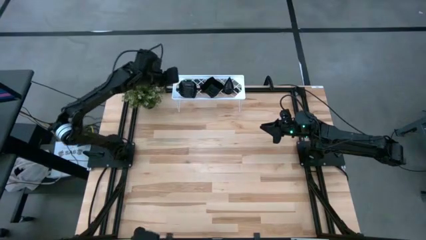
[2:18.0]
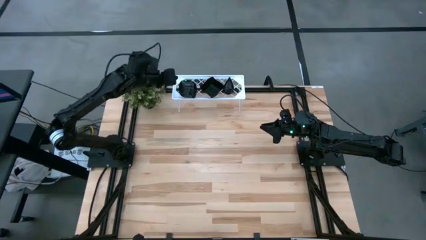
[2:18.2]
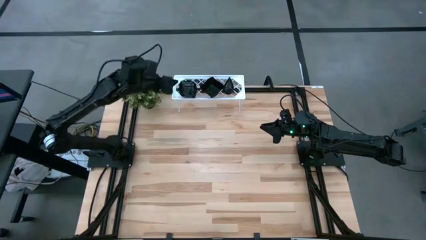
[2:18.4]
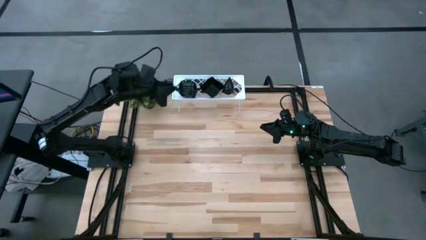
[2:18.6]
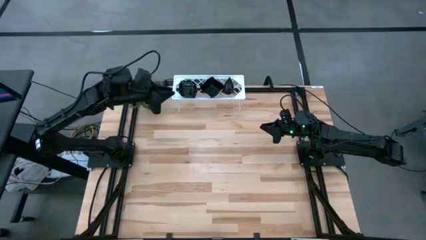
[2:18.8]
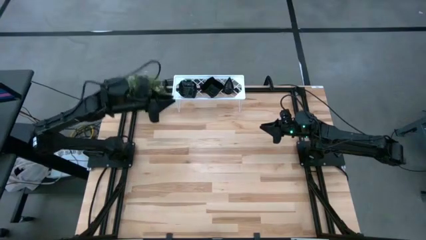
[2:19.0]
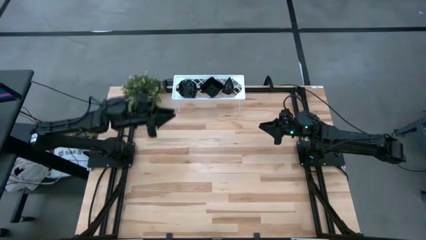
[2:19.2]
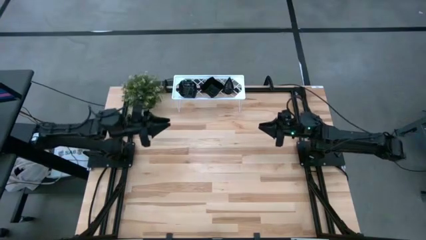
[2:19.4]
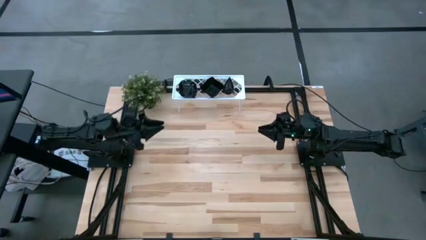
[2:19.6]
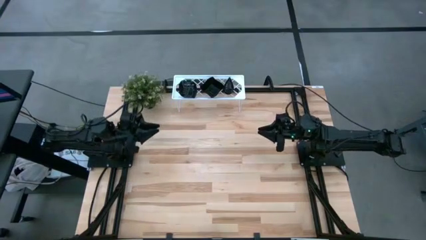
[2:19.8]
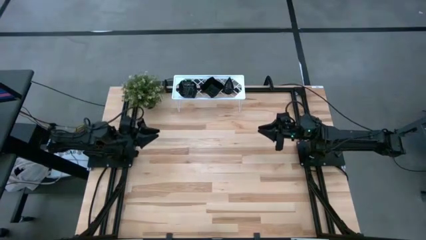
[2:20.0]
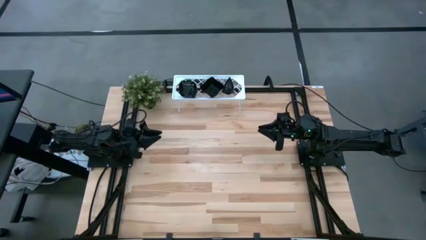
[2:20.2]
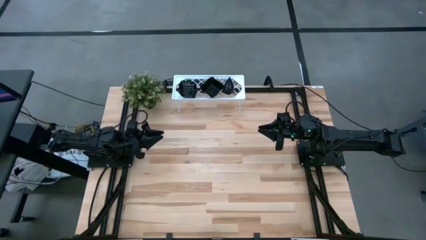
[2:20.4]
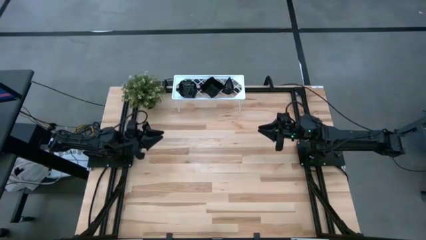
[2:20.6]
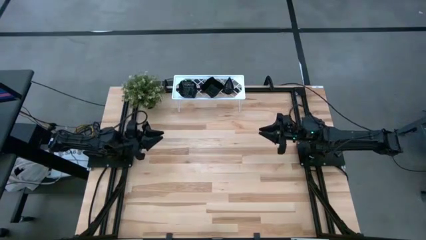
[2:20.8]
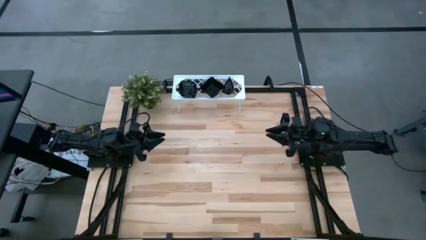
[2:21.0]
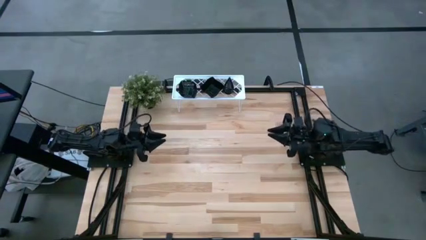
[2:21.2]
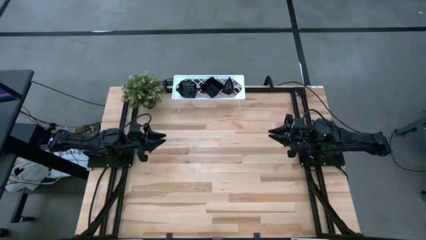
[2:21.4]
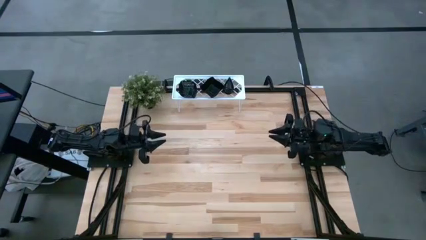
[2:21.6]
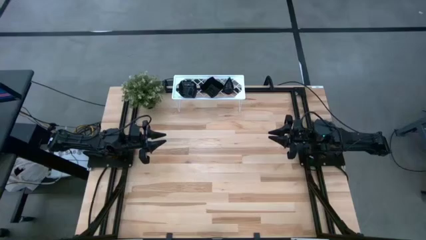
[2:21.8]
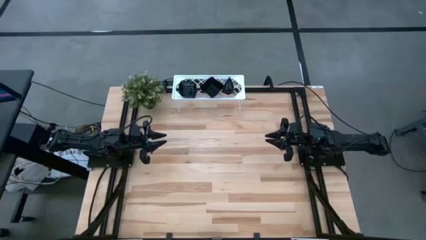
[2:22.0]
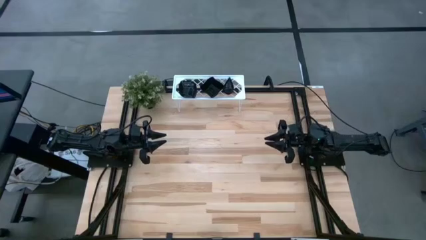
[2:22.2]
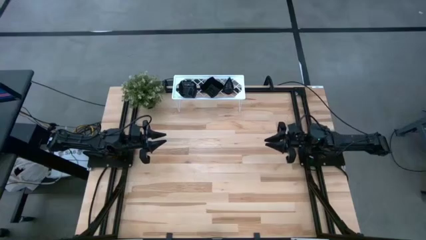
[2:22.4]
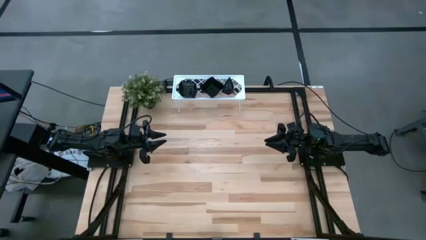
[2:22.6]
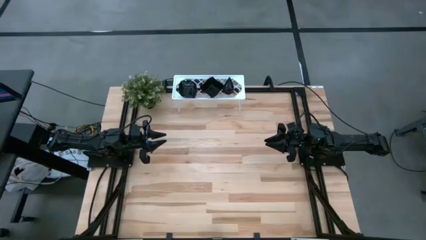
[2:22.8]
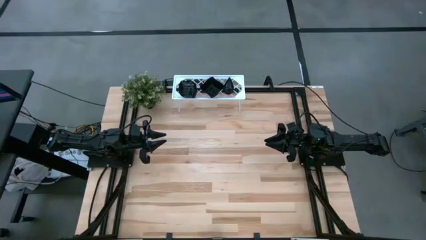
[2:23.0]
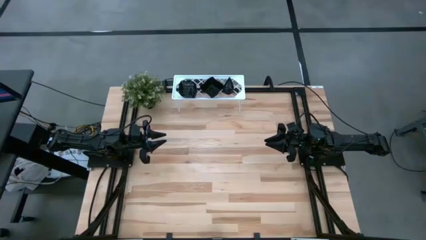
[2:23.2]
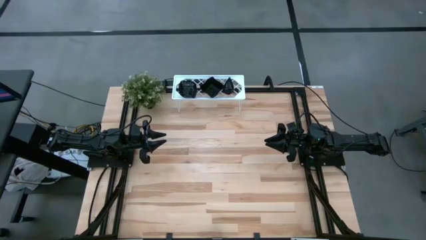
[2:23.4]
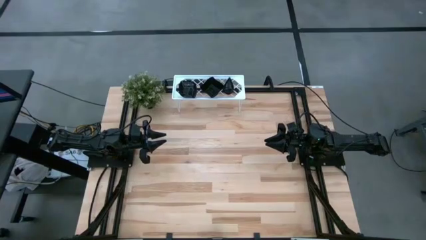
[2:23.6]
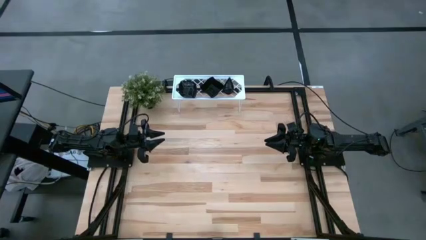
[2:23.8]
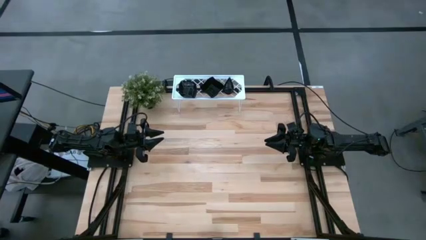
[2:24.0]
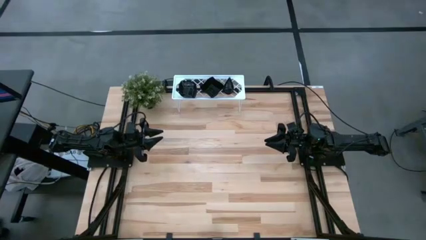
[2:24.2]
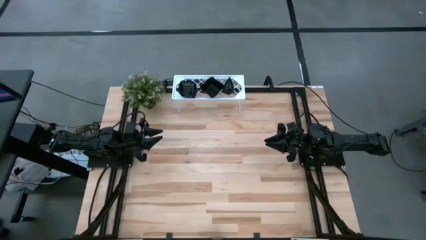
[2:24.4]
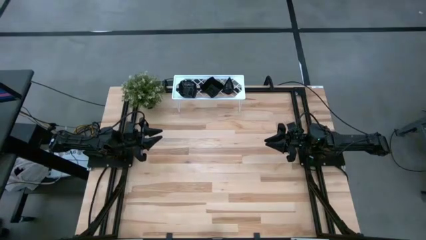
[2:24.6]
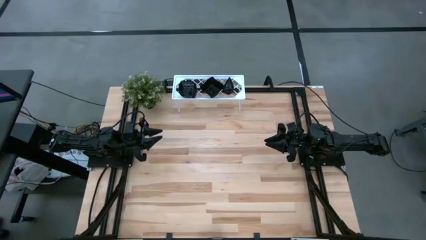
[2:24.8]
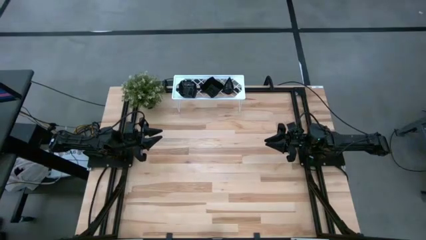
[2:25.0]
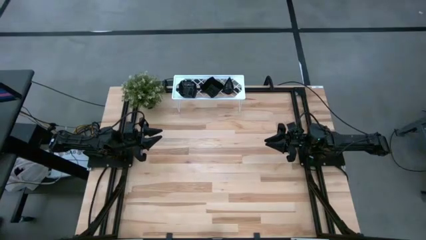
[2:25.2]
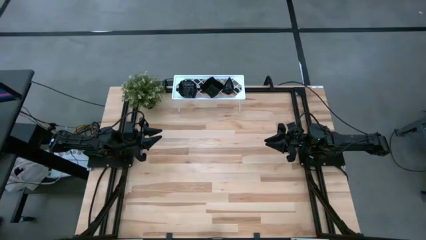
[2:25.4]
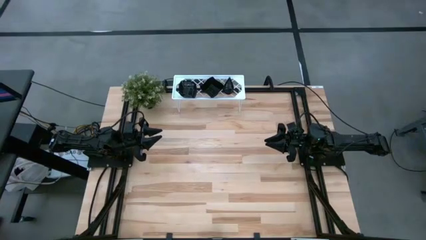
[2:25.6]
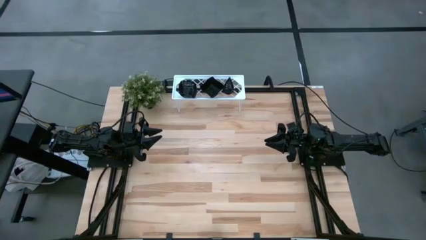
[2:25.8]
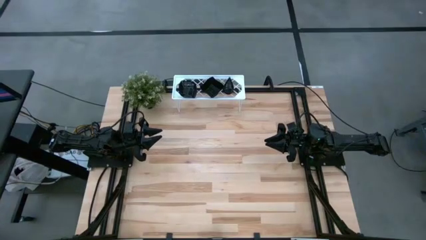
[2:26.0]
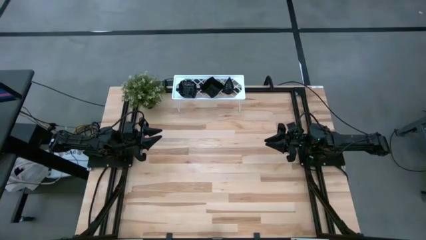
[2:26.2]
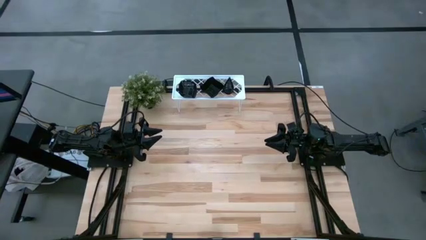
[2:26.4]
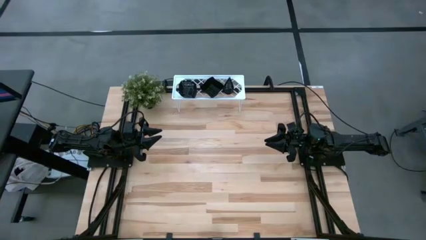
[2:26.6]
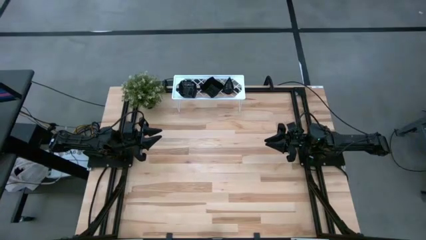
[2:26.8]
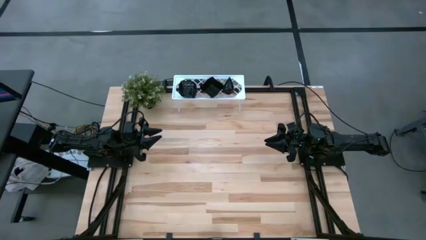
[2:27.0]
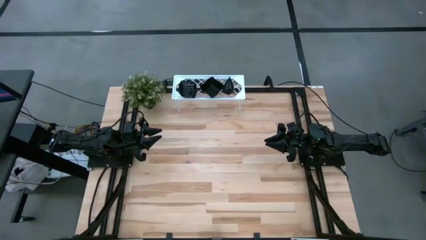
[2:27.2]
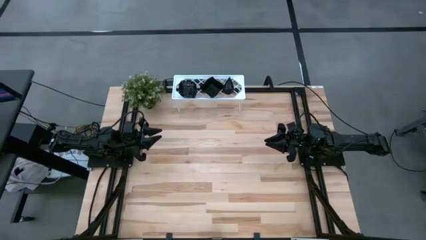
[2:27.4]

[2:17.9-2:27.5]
Task: Pick & Place Mini shaped plates
Return to Home Position

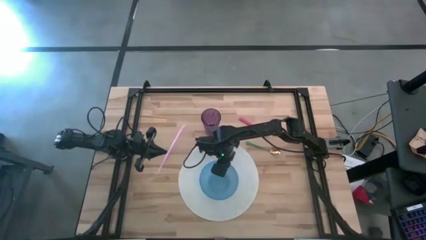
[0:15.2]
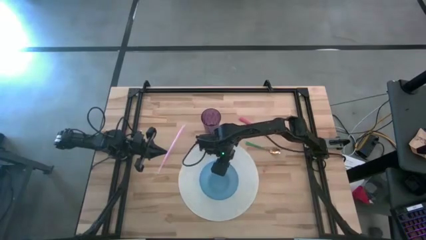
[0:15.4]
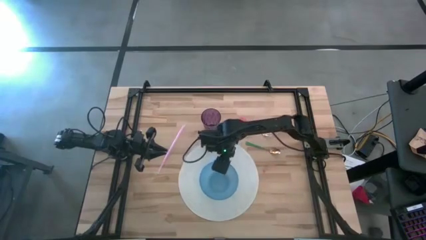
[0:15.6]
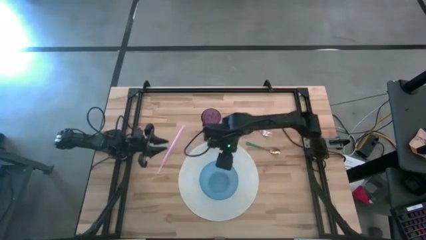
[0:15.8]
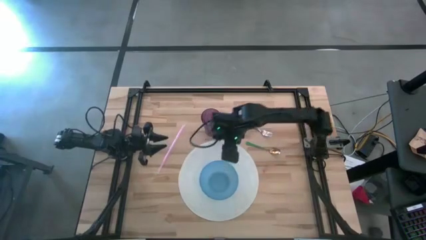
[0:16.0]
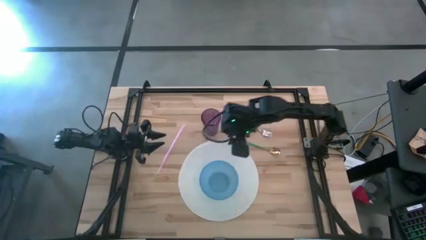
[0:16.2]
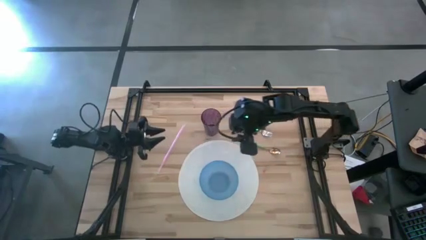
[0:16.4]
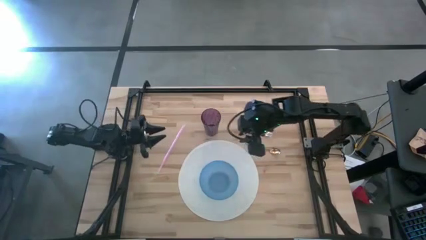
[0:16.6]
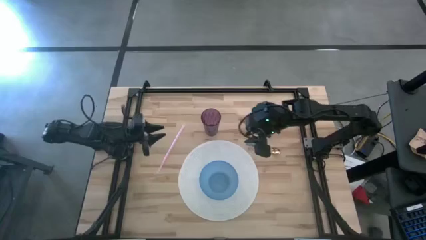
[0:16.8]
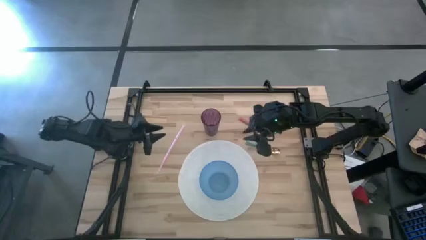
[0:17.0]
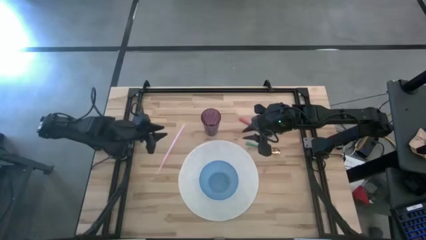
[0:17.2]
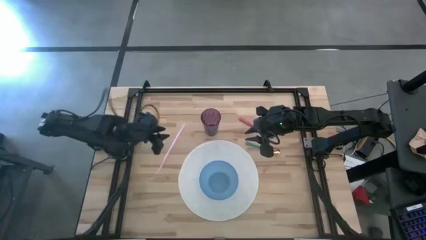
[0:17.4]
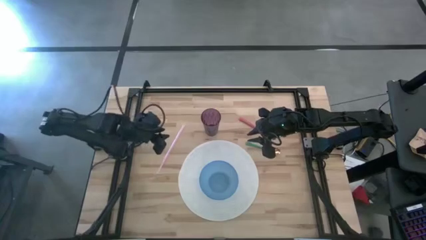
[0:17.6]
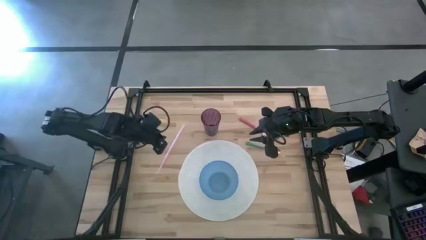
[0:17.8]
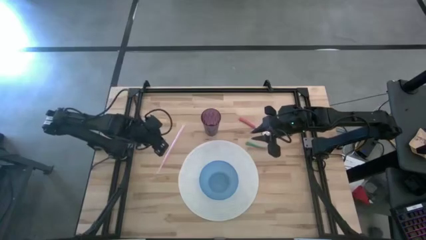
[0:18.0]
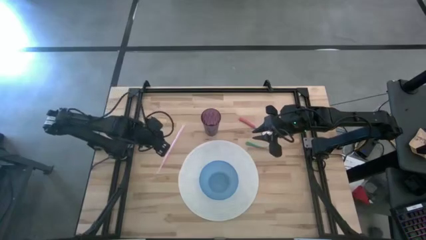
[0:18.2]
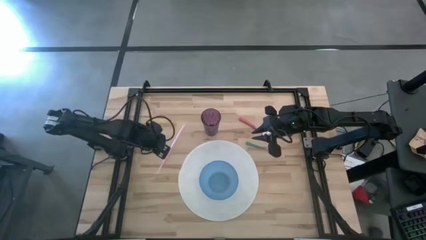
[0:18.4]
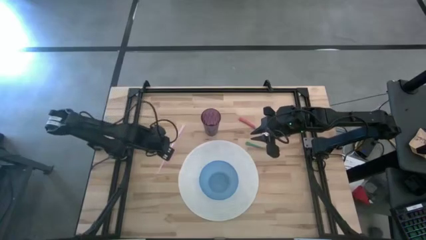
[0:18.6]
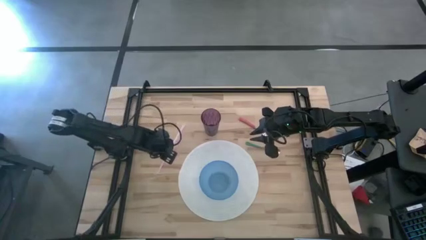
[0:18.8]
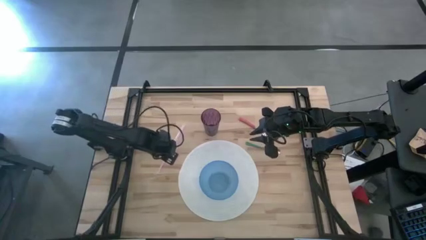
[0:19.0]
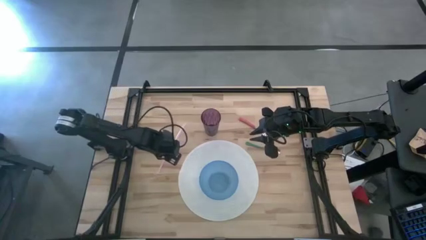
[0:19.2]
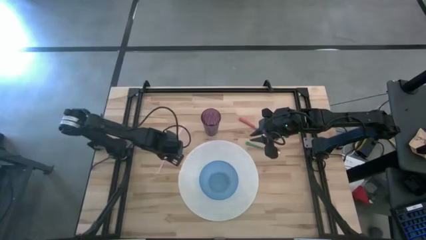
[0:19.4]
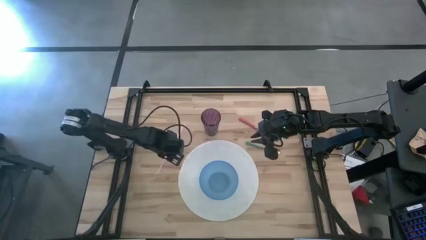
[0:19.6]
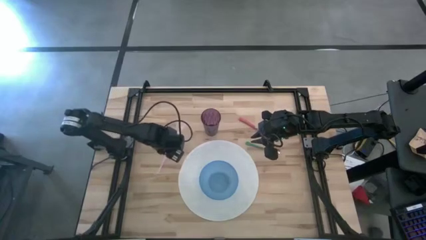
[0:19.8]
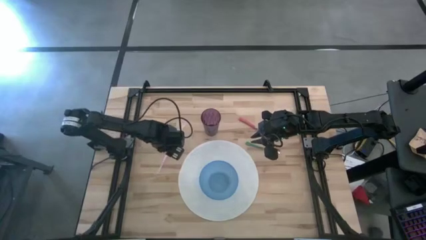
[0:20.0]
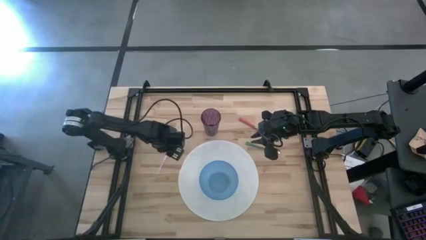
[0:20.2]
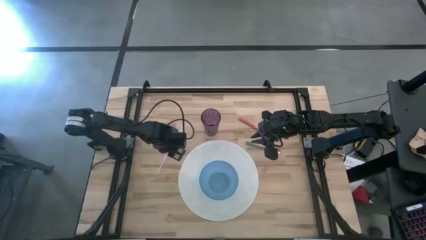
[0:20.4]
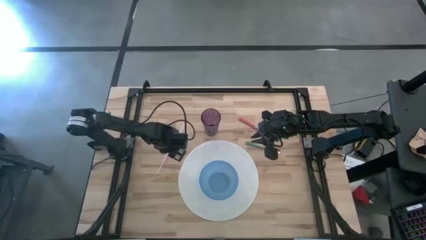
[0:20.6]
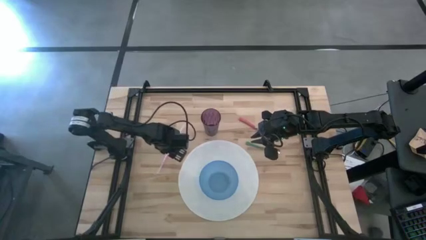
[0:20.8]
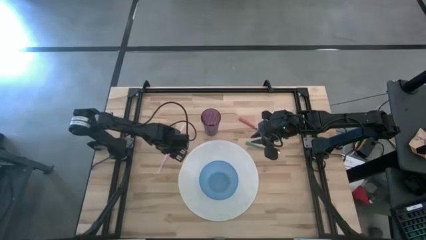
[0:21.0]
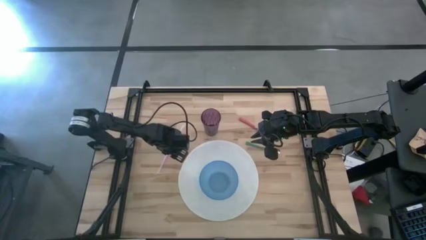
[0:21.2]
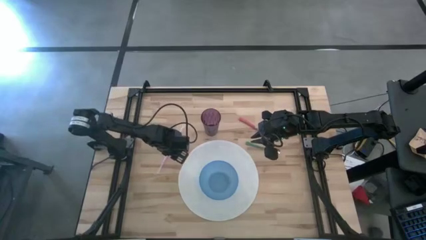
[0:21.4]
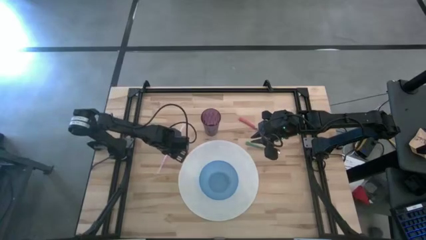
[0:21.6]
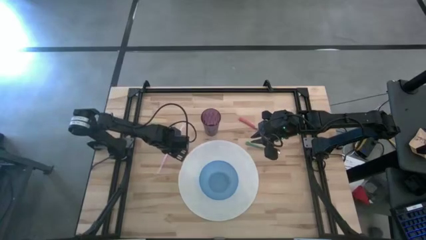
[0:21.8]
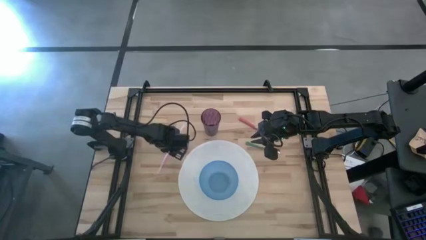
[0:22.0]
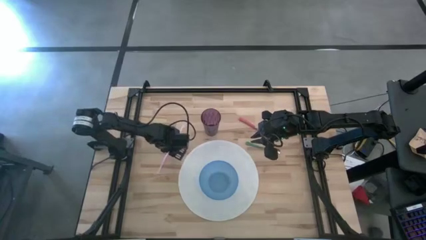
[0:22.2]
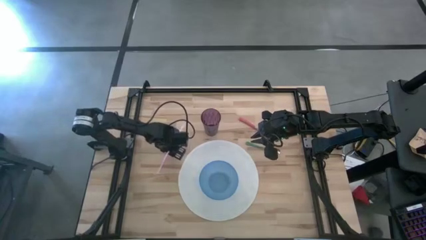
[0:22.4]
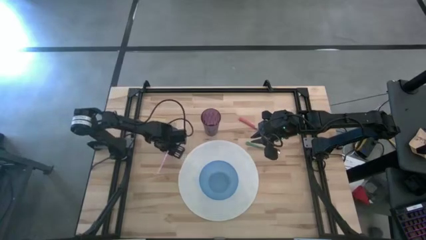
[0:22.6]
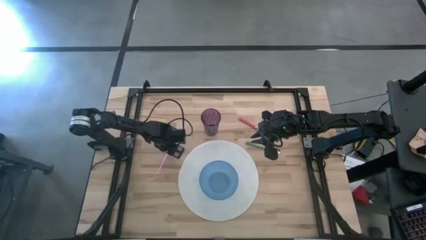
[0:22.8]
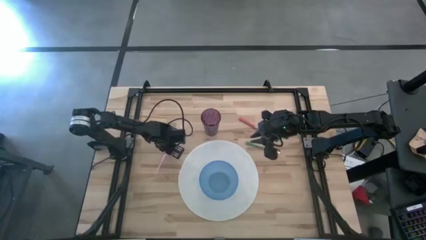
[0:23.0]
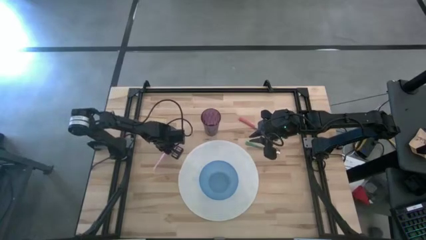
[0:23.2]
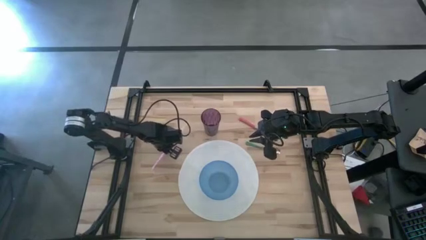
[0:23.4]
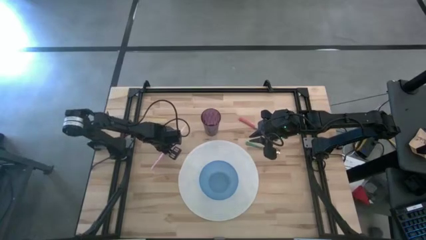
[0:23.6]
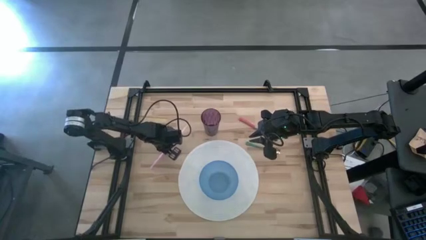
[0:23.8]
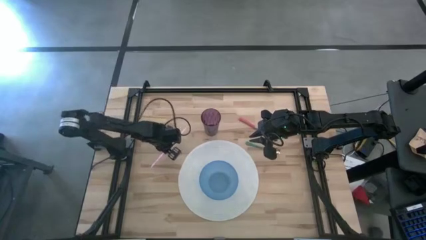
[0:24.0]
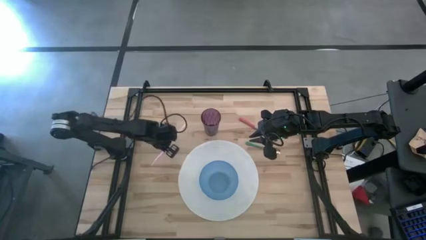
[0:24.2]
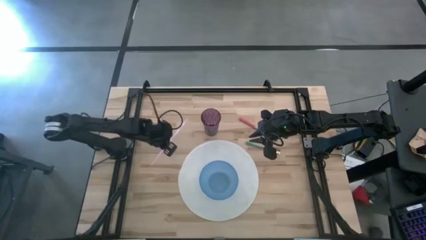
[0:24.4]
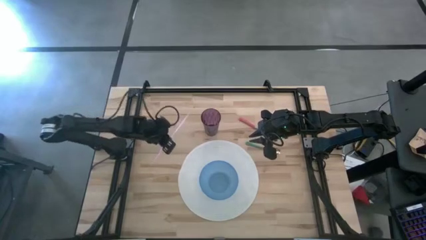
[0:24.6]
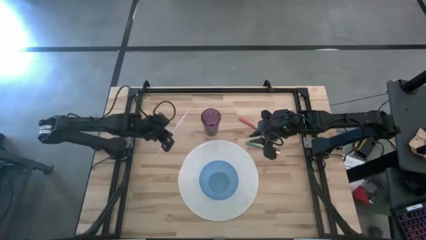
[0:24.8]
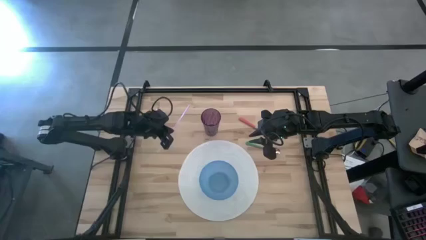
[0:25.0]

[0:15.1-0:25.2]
Task: Pick & Place Utensil
Put the straw into the cup
